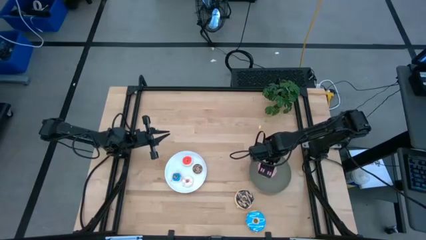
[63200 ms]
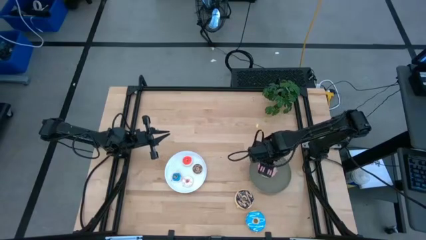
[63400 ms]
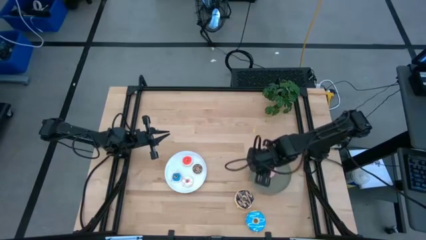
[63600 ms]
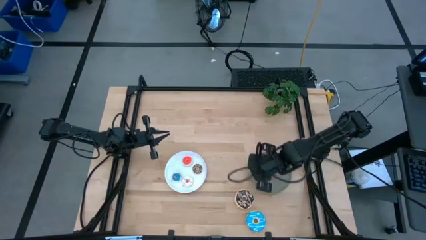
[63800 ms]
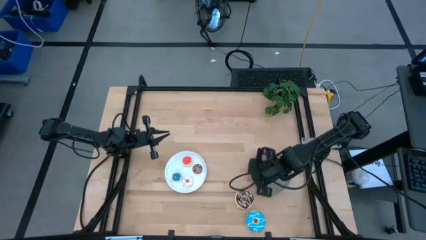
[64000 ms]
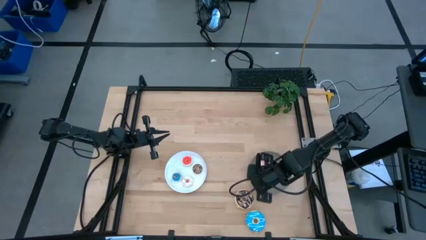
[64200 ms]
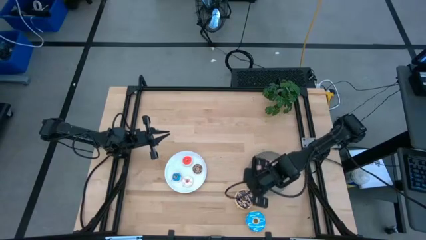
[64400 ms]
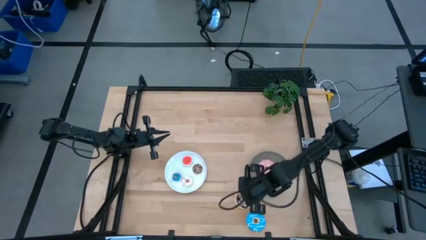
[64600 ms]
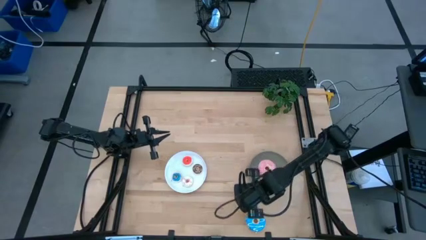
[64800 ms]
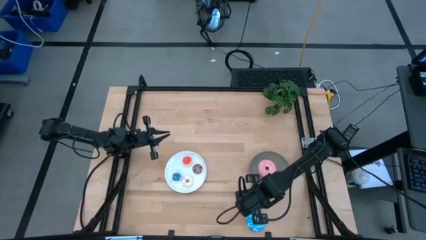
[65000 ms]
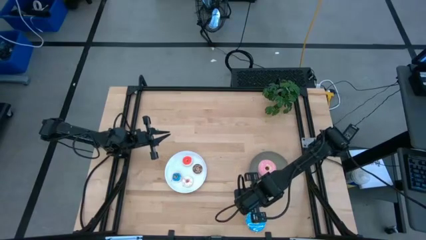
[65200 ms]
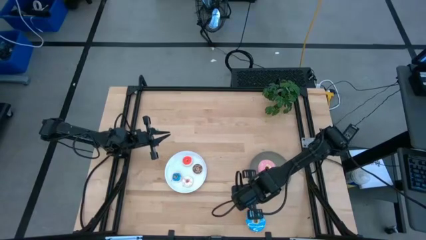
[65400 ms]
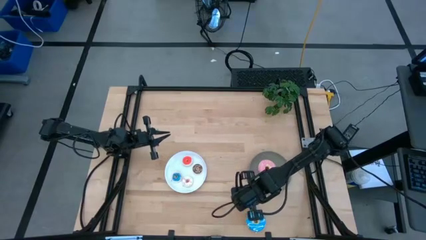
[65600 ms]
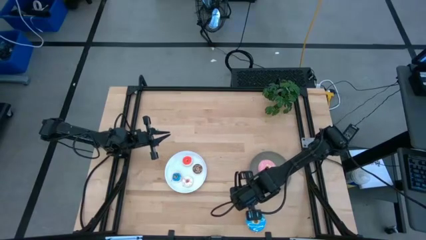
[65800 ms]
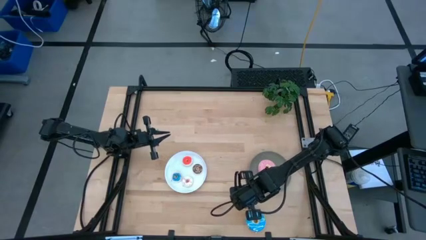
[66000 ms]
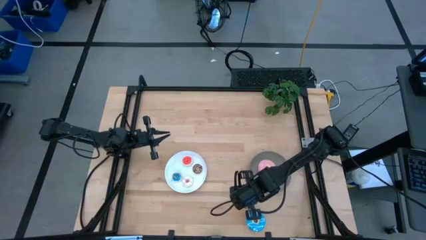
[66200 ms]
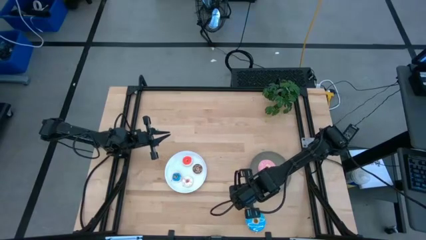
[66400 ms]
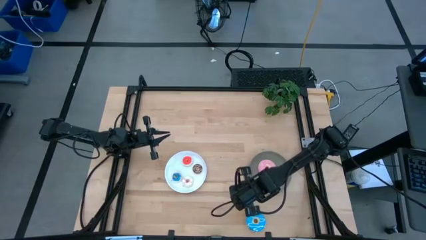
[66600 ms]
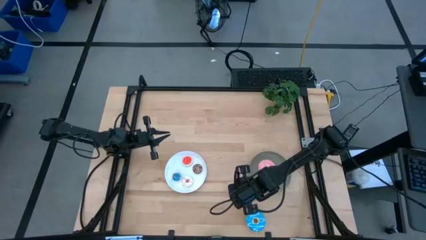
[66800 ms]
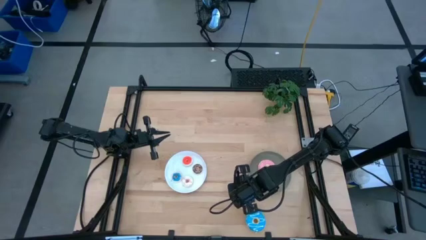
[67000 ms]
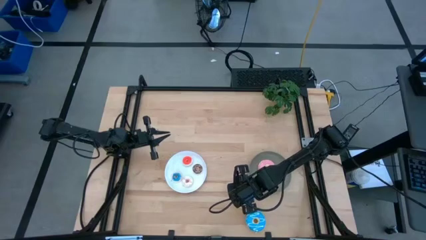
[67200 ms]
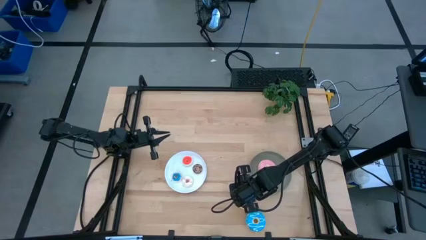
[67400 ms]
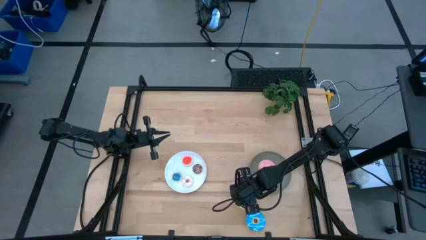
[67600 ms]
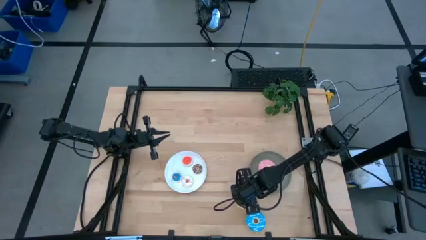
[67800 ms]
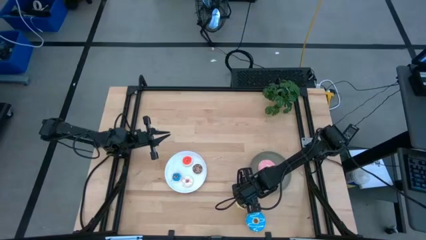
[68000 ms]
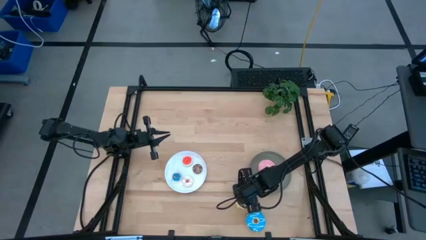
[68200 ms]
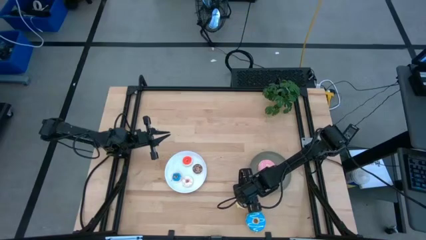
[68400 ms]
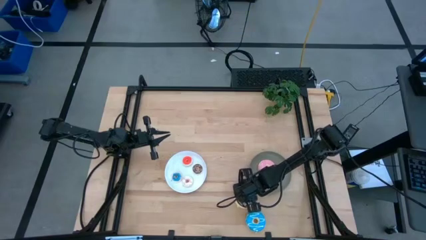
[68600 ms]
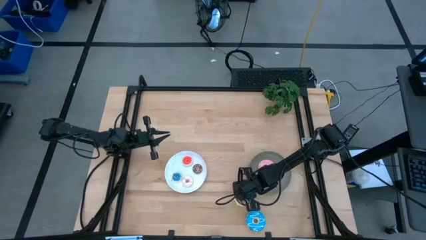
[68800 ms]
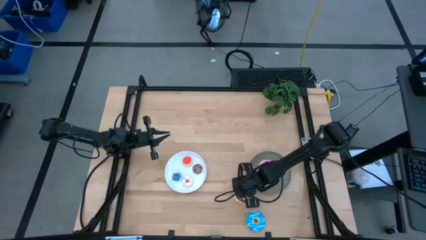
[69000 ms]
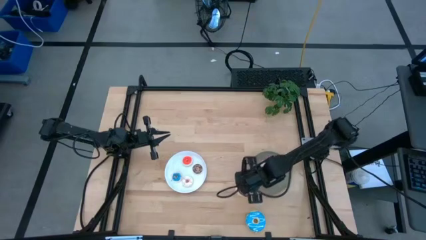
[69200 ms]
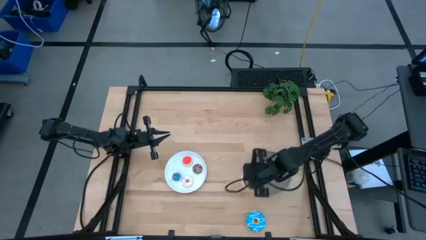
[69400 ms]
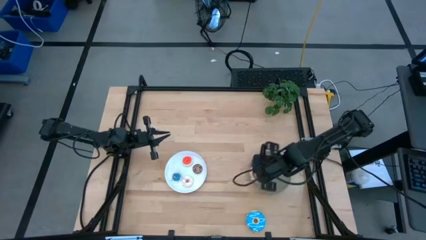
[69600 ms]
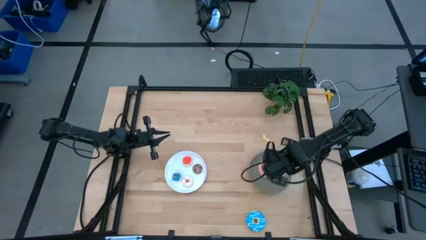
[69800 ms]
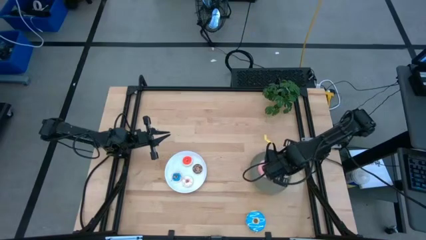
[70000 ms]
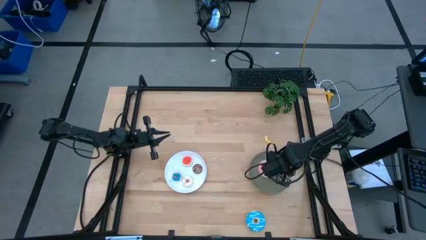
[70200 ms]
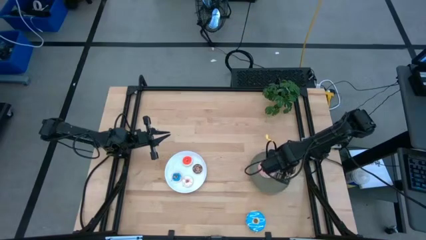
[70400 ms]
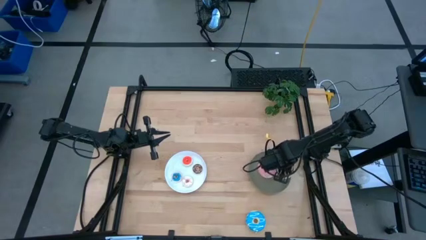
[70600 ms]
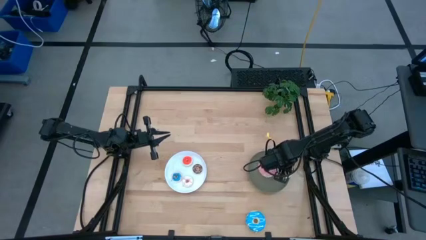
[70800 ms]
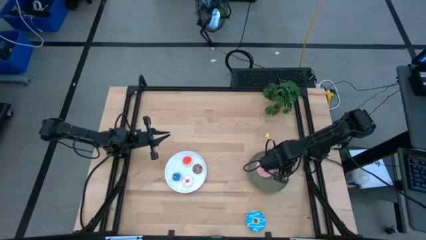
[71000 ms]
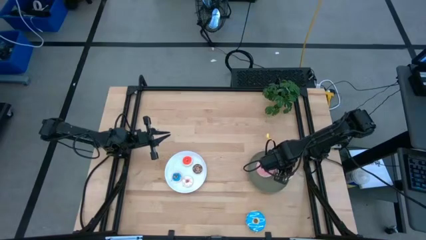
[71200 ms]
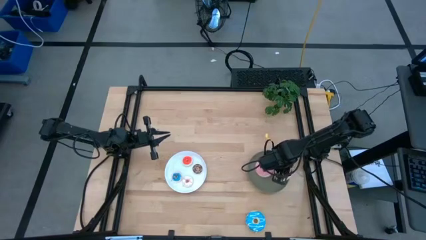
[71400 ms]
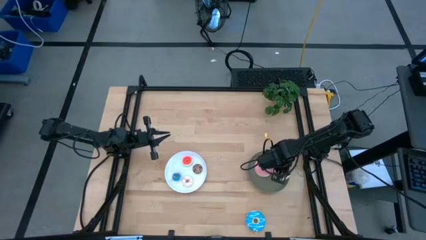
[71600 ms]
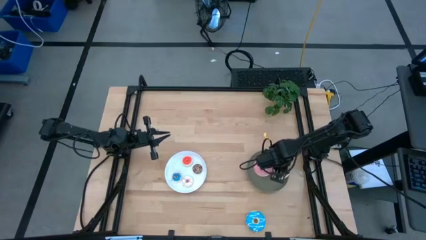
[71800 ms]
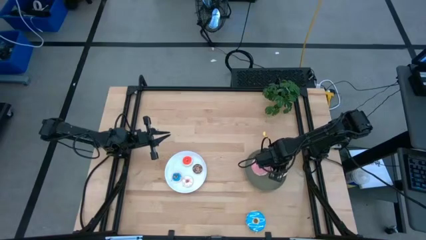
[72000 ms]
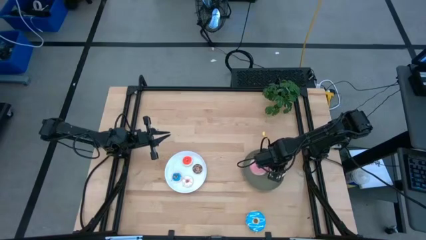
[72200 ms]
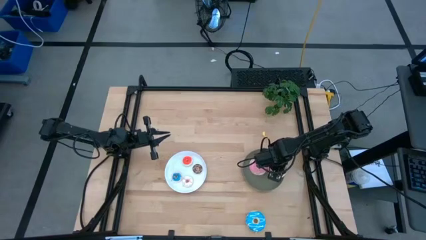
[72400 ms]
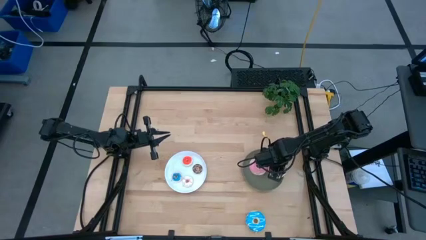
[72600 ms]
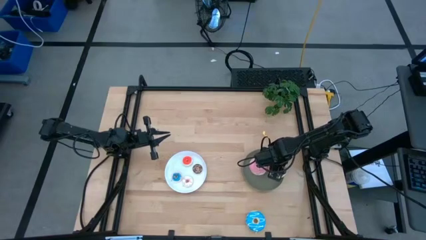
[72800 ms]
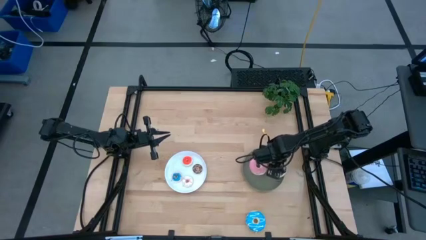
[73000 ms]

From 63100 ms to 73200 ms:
Task: Pick & Place donuts
Put the large black donut on the gray plate

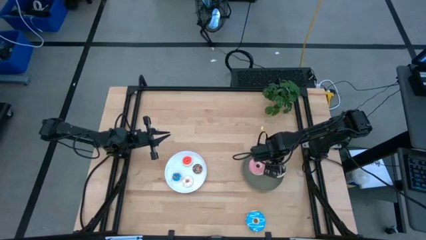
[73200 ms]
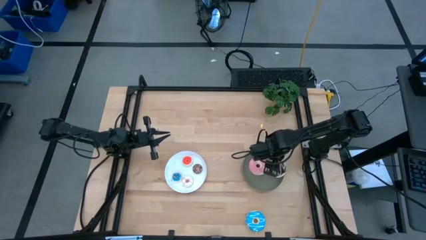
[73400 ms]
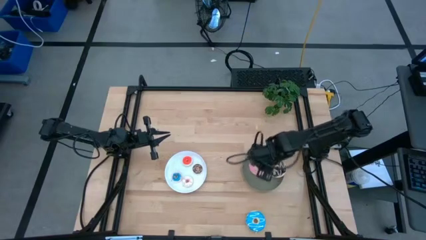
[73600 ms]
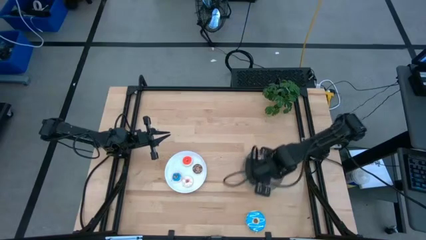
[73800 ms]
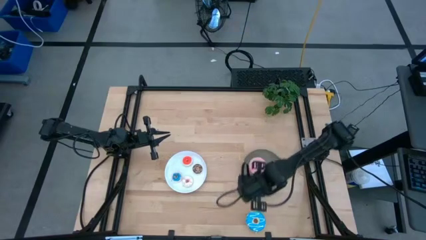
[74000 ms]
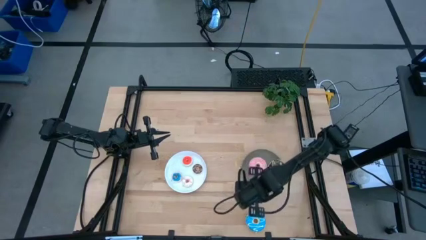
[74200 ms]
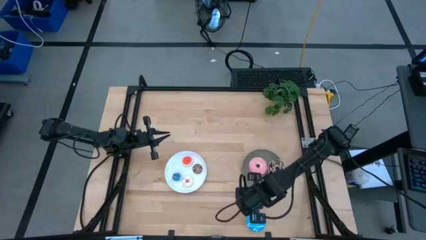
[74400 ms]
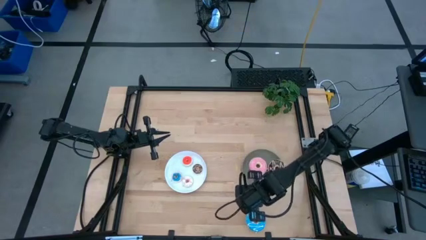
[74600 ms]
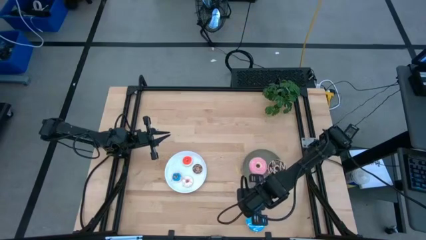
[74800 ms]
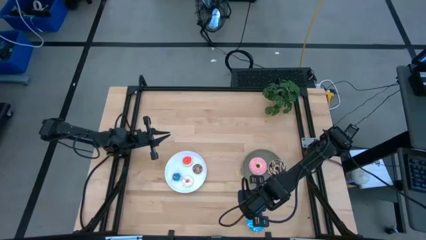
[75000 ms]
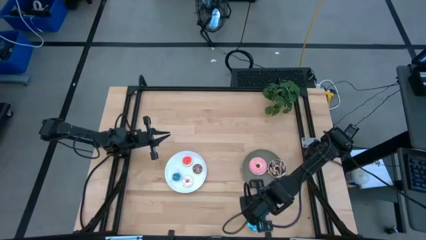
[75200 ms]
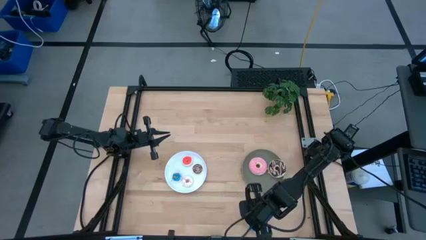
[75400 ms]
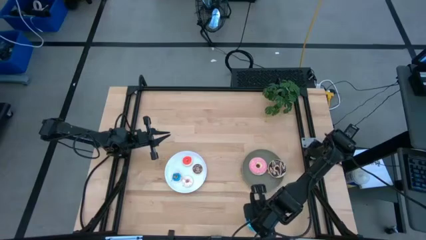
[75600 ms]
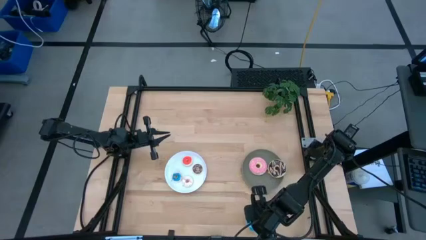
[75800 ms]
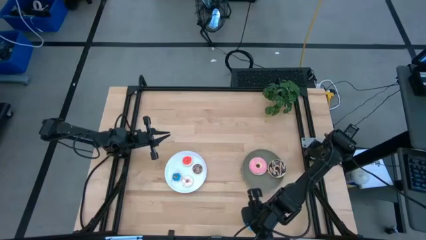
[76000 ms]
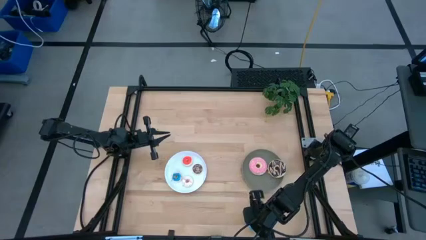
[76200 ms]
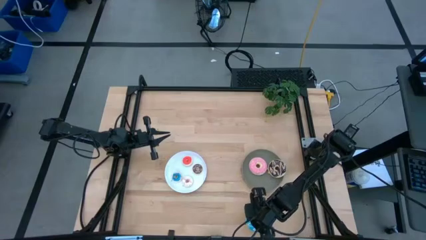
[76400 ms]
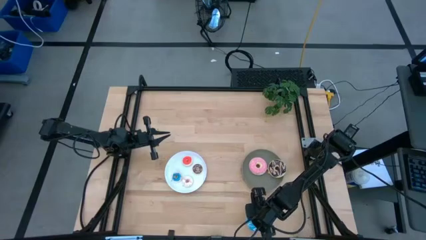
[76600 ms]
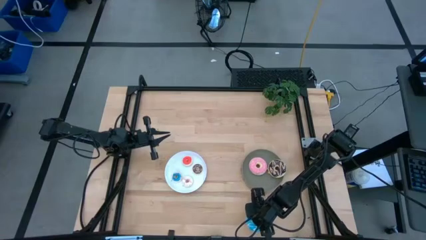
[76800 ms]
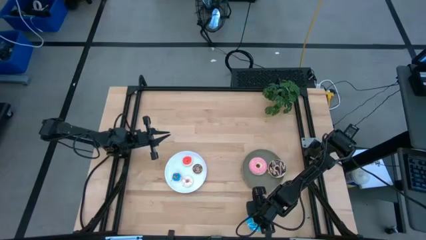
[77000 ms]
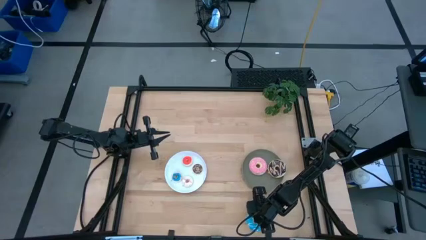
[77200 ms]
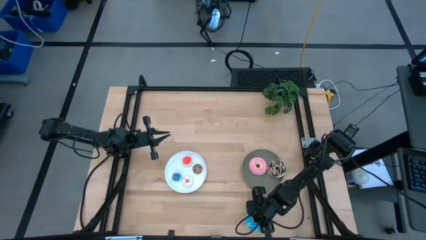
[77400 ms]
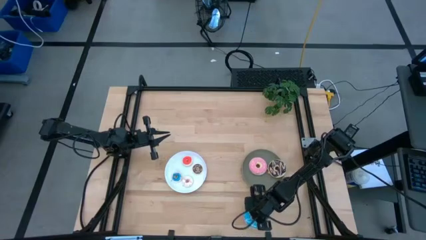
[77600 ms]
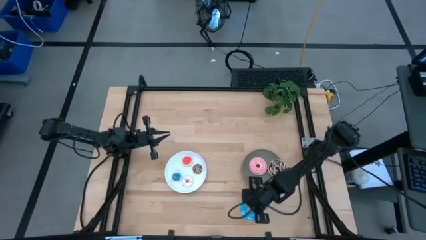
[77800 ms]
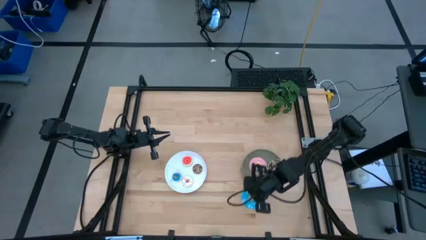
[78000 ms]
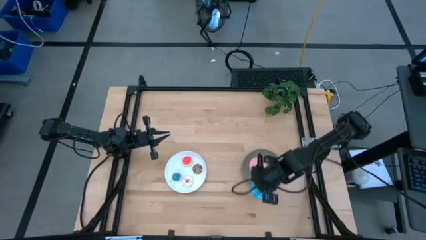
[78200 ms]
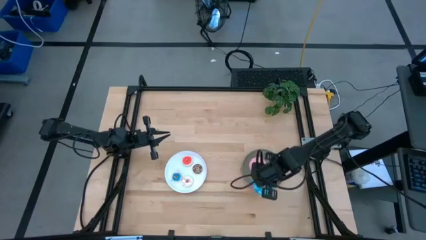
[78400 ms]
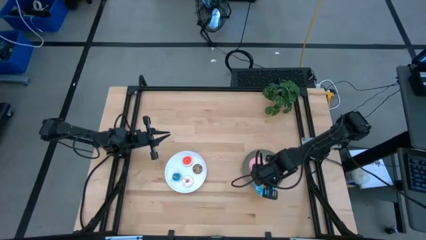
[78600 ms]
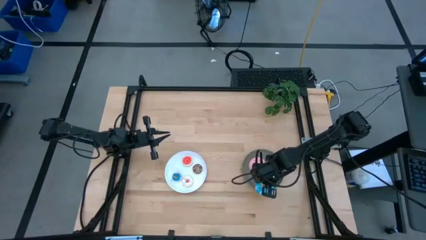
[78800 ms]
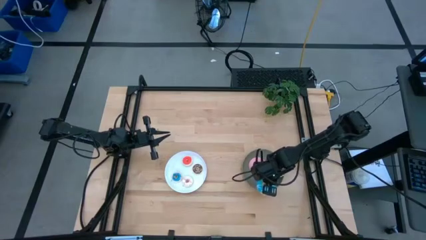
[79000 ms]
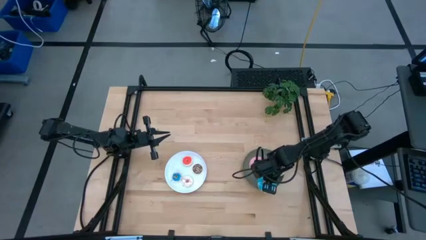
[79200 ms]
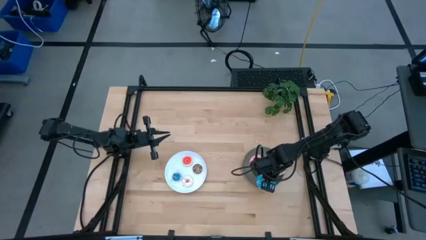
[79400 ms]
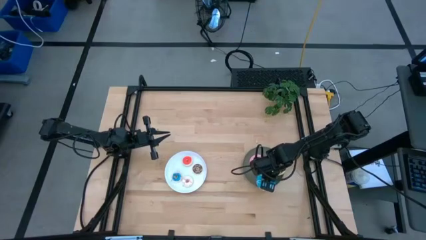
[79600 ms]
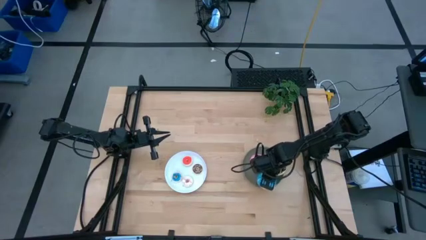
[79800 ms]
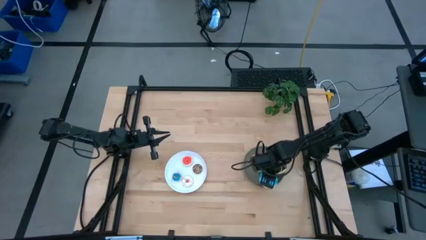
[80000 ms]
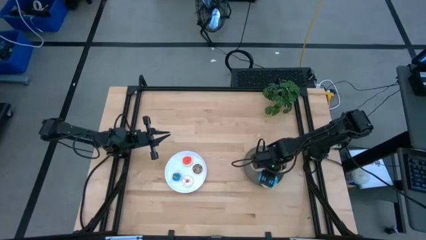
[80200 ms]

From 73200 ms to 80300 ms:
Put the large blue donut on the gray plate

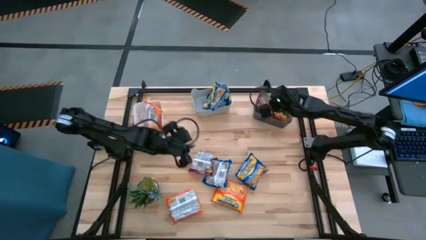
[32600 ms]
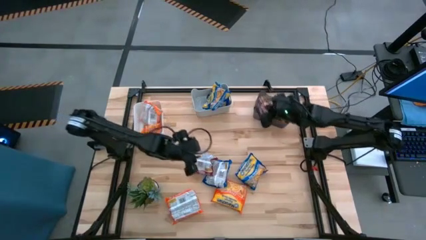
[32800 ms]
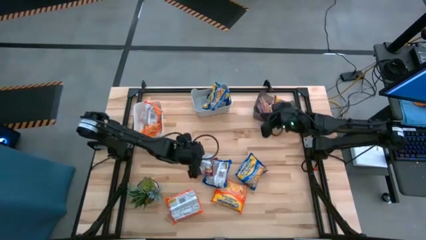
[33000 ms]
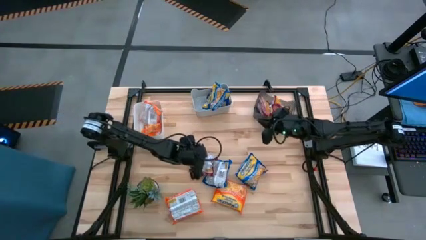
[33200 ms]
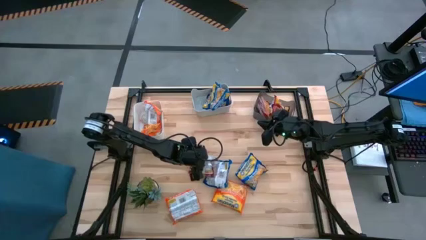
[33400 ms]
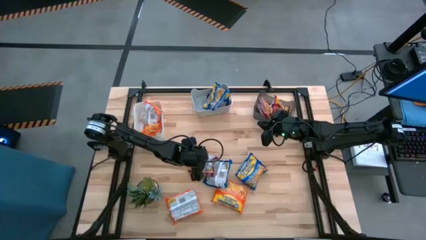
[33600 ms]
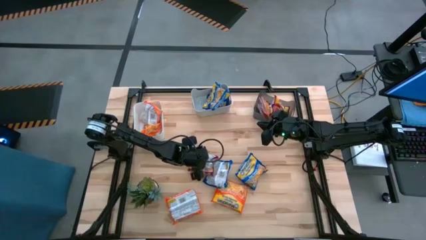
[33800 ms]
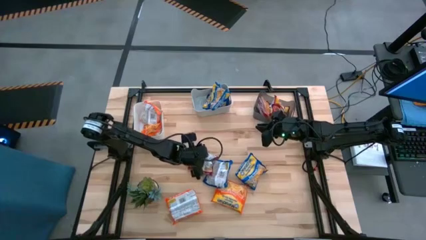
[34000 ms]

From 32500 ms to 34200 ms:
Task: Sort Maruchan noodles
Put the red noodle pack into the black bin
